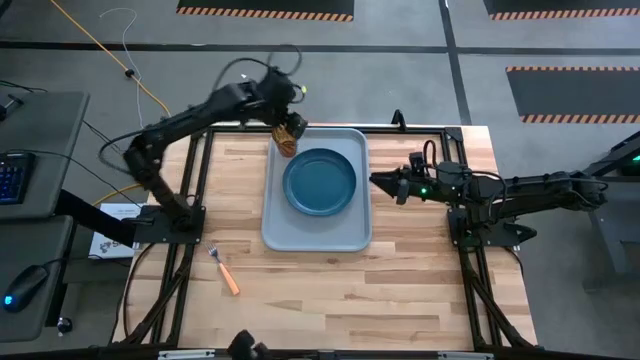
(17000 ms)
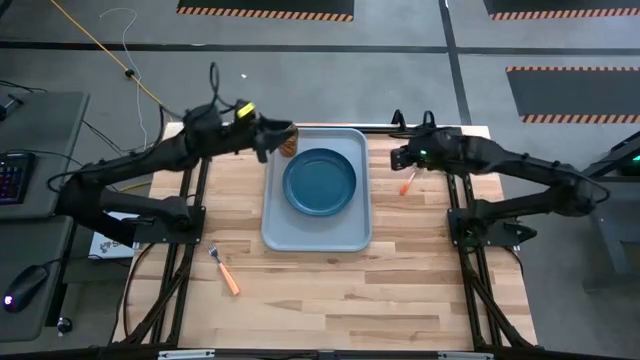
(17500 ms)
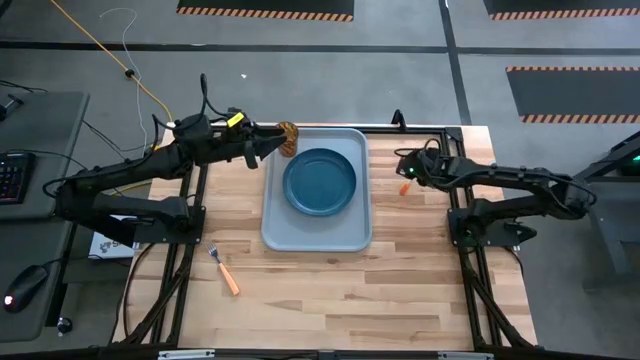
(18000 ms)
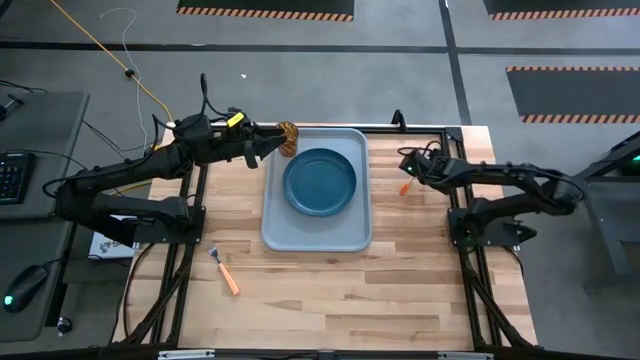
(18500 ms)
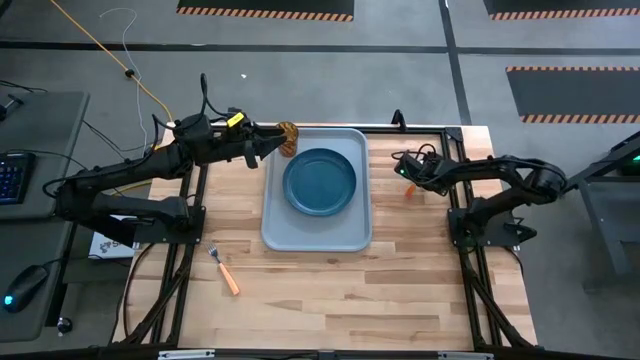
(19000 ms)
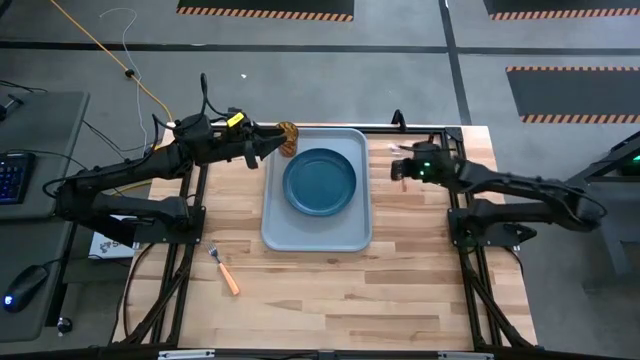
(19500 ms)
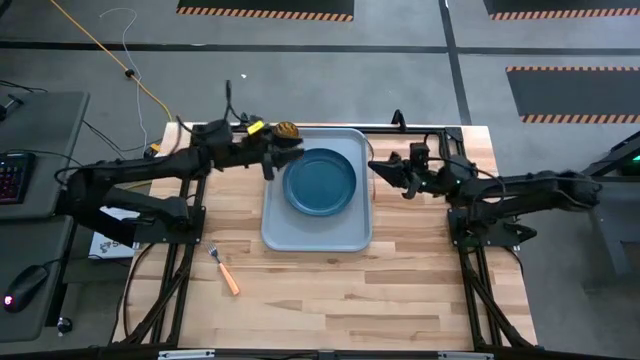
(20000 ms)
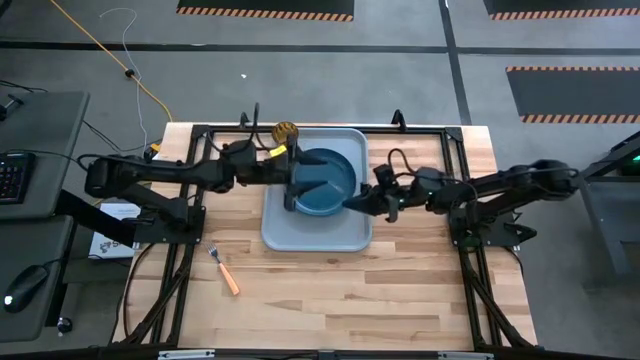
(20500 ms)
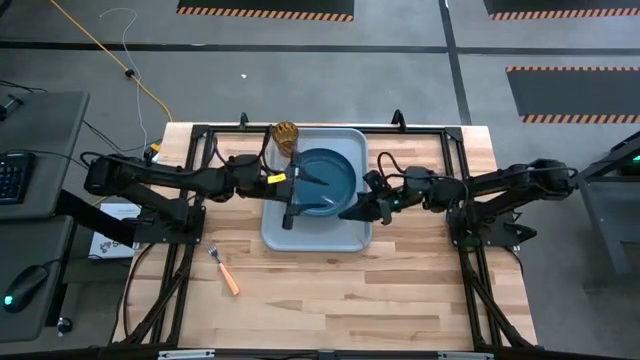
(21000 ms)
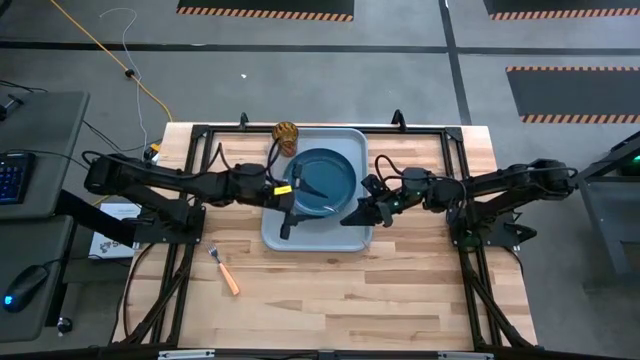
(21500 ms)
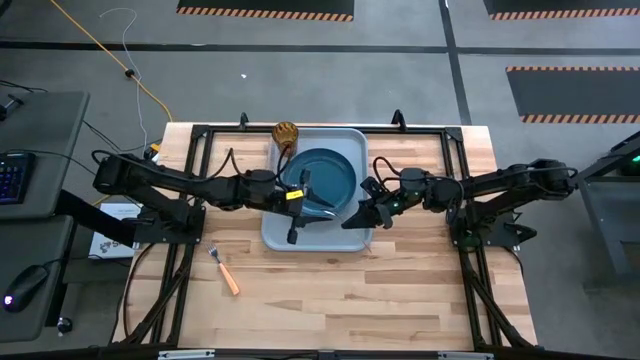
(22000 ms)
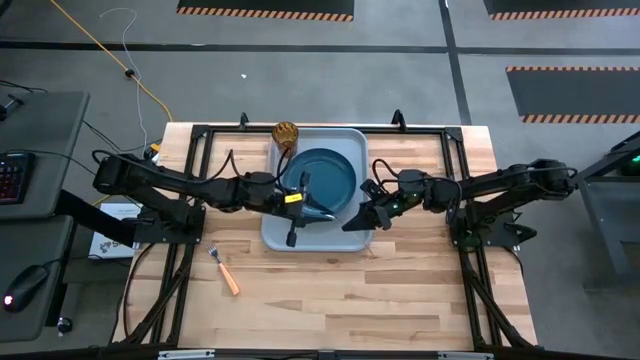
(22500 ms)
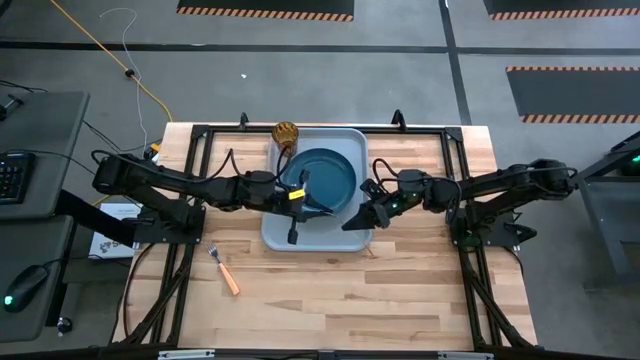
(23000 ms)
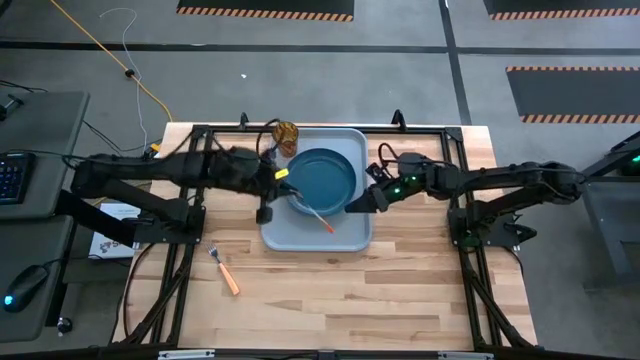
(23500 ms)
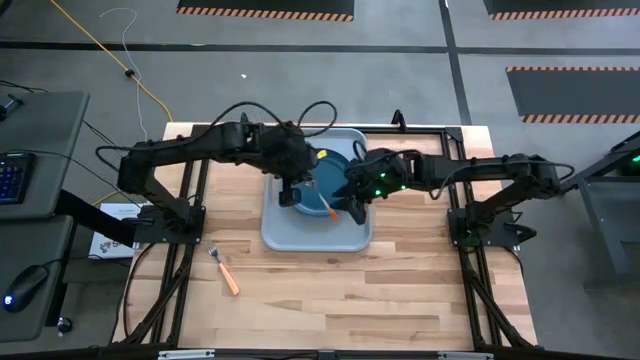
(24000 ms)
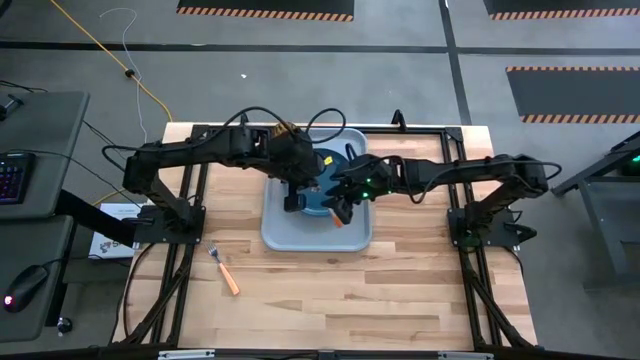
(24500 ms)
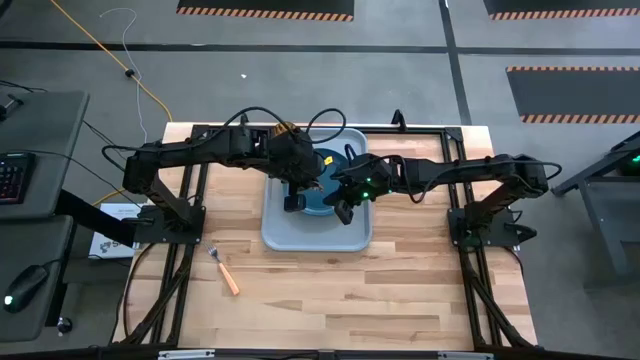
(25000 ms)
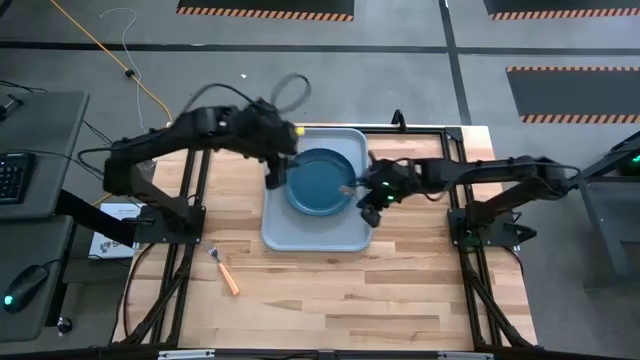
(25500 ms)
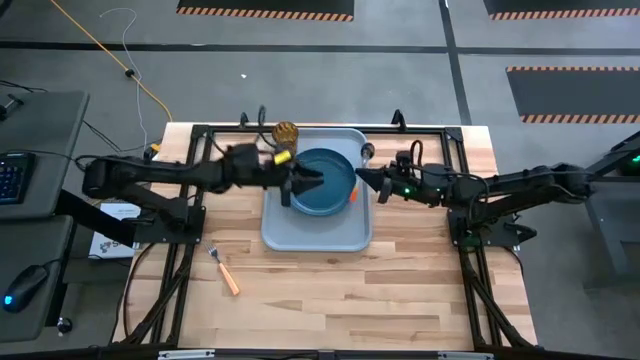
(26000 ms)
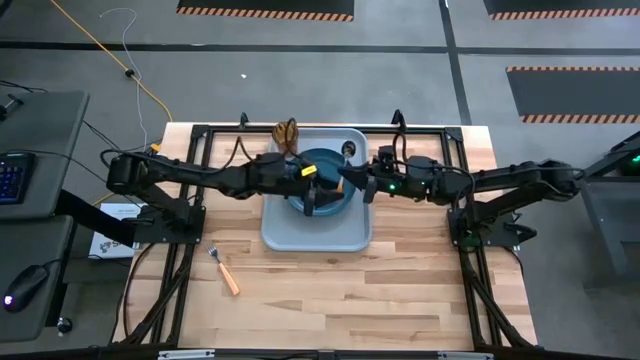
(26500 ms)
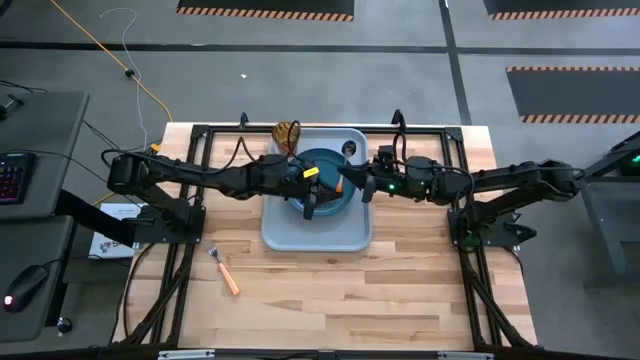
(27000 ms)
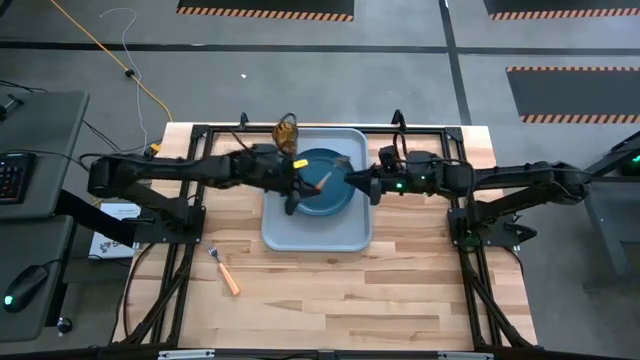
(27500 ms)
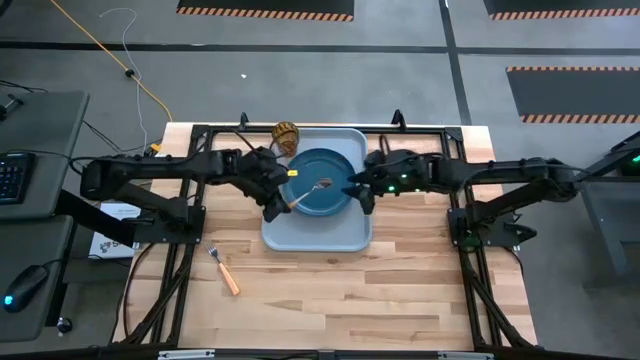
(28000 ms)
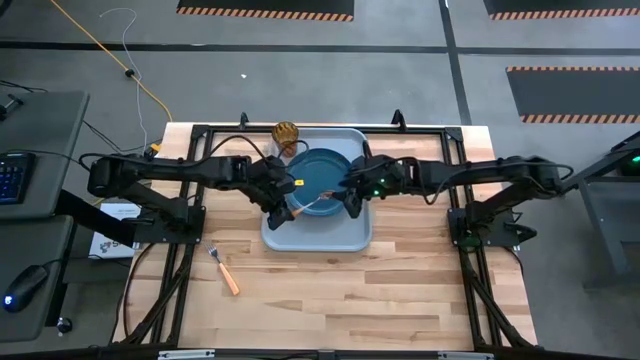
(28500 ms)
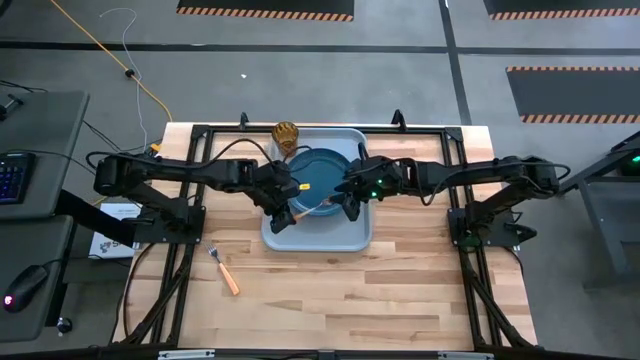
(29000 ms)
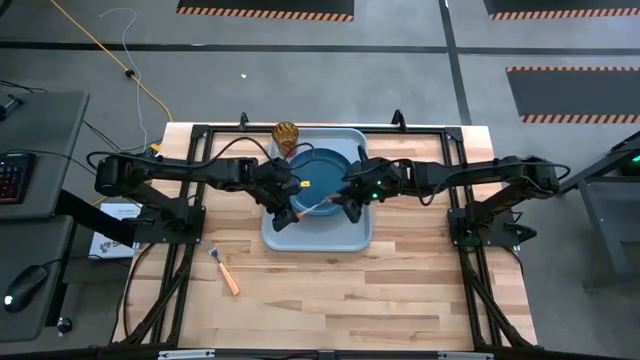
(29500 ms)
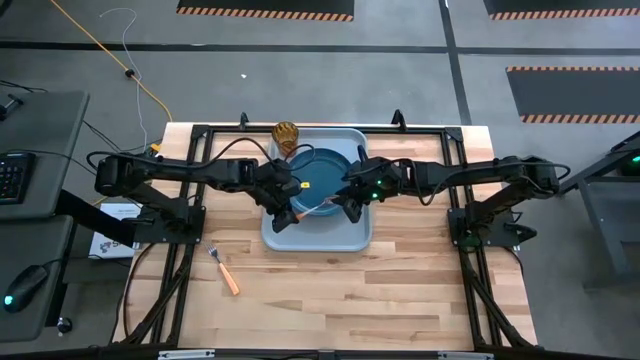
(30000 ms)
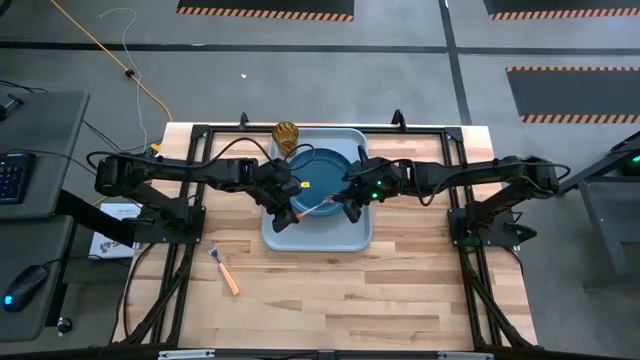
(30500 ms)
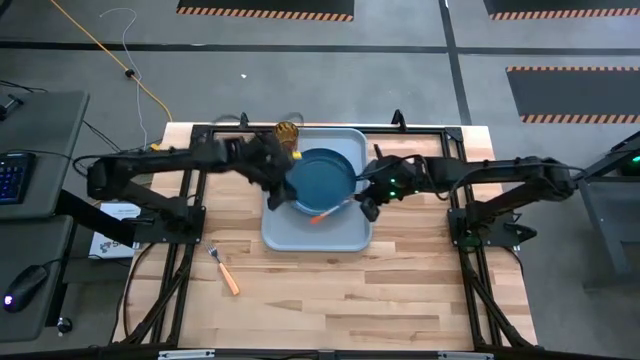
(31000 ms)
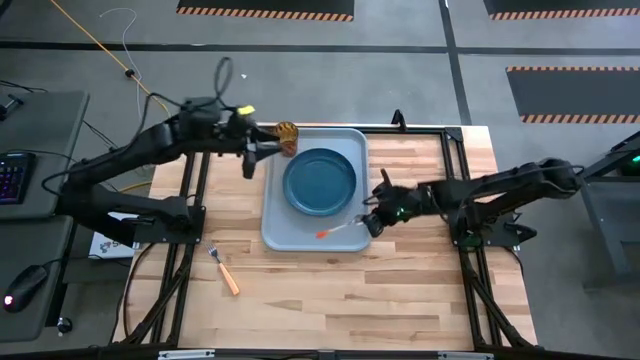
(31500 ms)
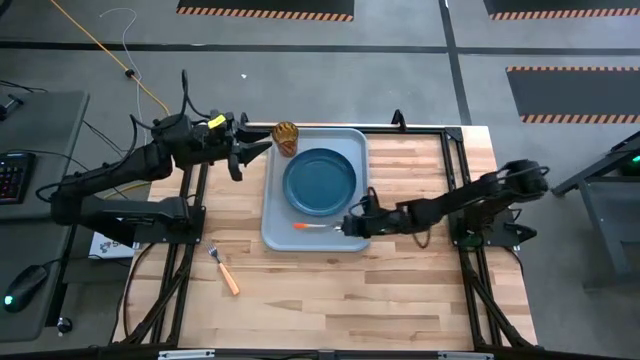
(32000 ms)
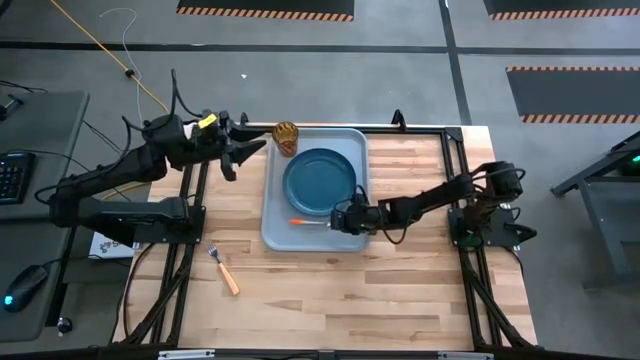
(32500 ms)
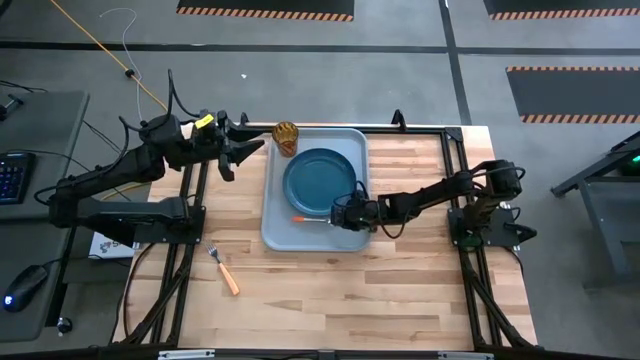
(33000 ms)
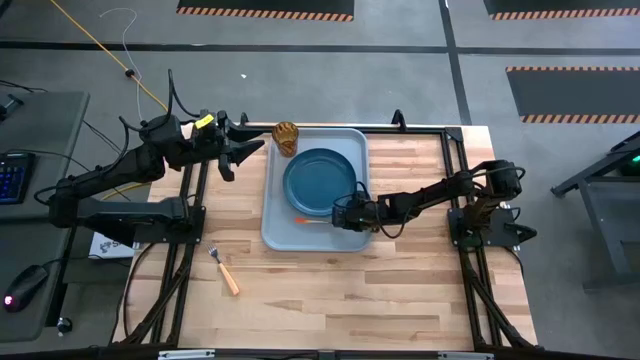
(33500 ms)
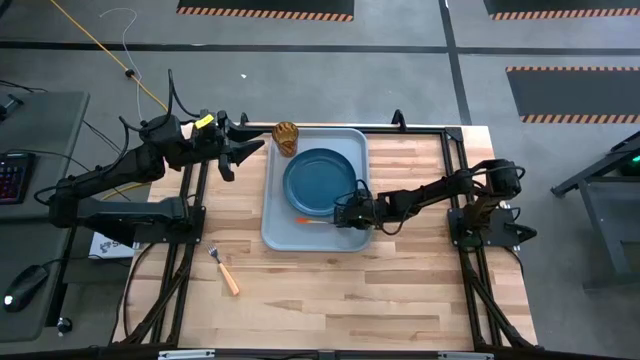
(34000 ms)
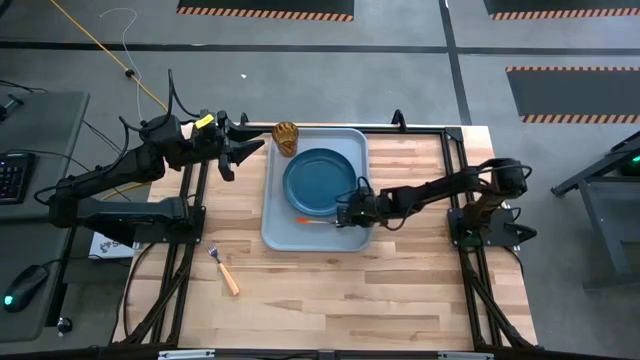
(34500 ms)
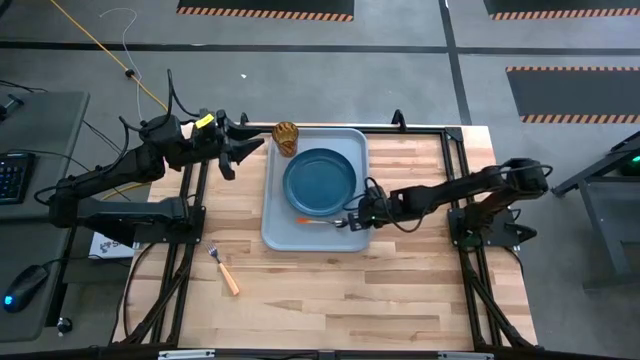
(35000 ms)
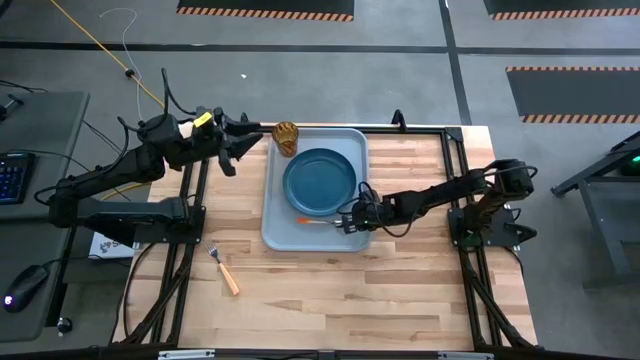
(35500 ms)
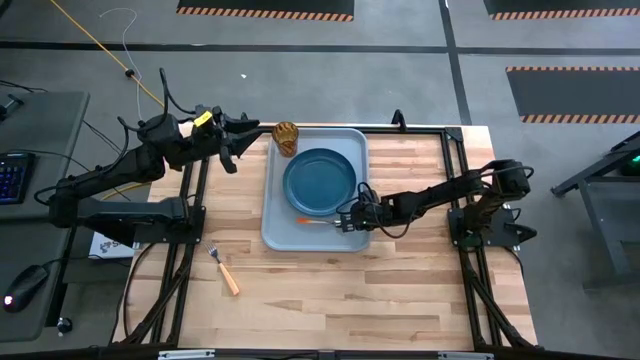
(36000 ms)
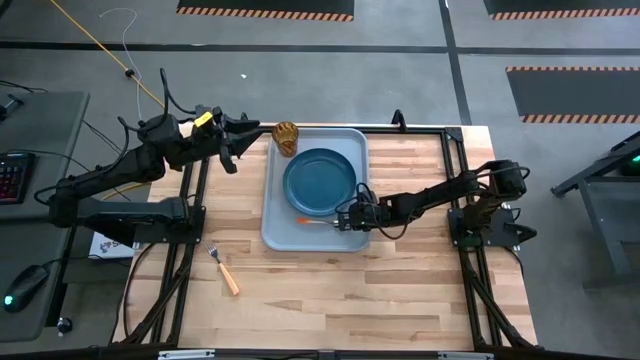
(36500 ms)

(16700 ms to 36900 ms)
Task: Pick and place plate/cup/fork/spoon on tray
Put the orange spoon on the bottom side of the light blue tray
